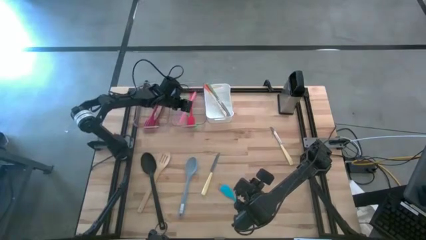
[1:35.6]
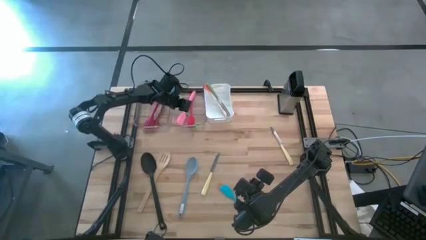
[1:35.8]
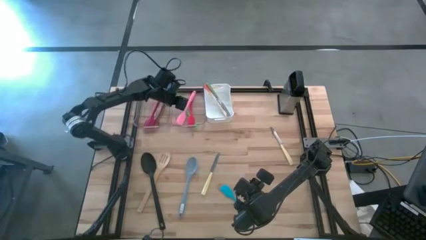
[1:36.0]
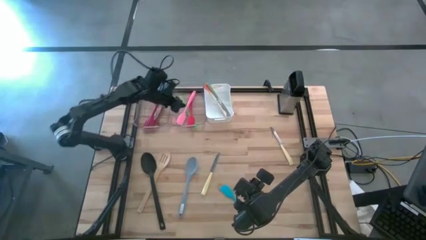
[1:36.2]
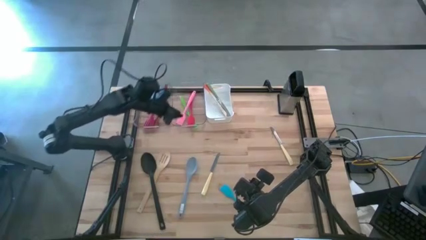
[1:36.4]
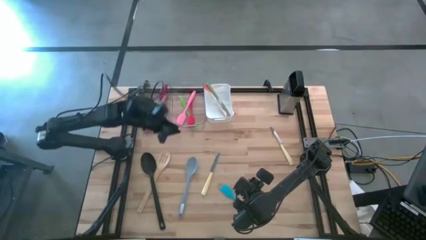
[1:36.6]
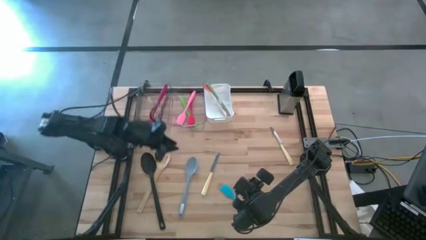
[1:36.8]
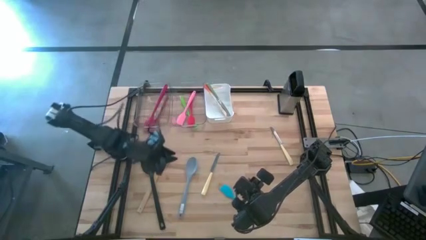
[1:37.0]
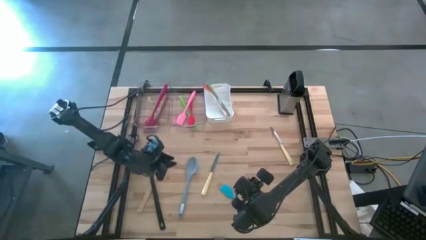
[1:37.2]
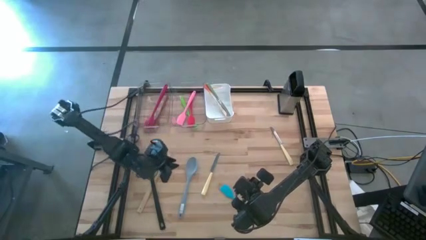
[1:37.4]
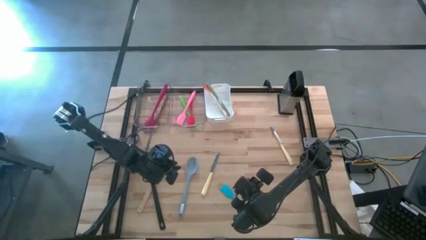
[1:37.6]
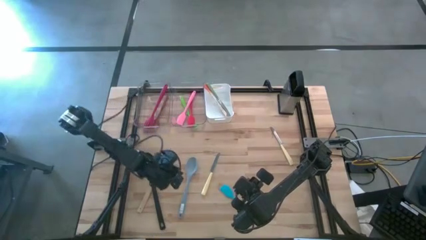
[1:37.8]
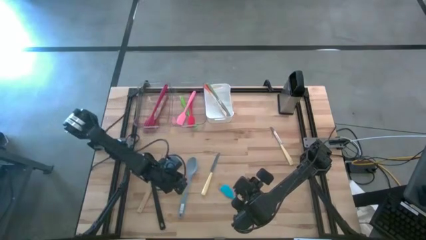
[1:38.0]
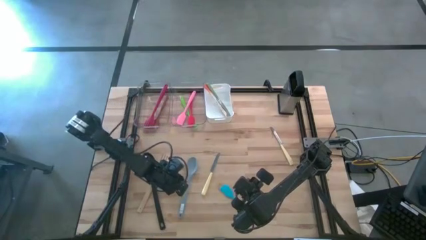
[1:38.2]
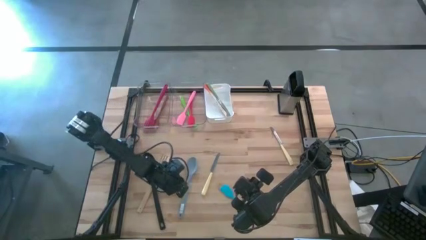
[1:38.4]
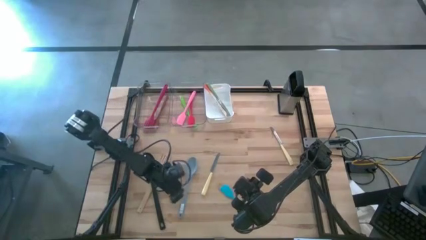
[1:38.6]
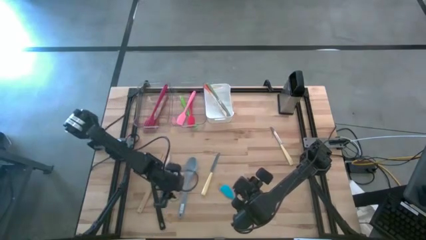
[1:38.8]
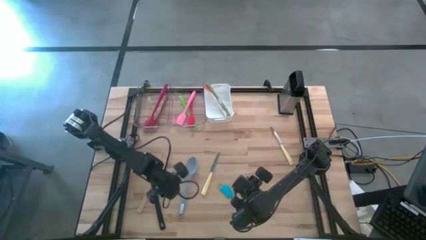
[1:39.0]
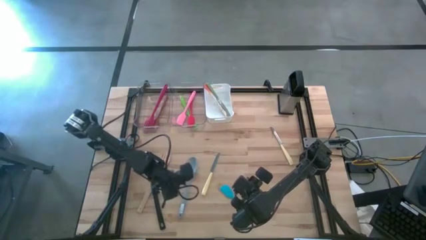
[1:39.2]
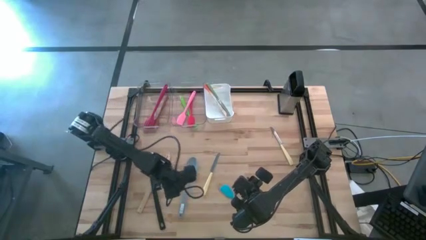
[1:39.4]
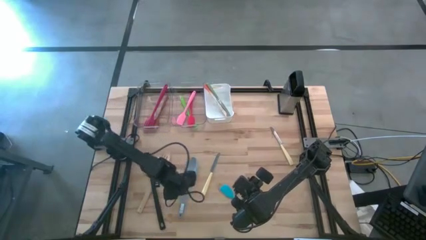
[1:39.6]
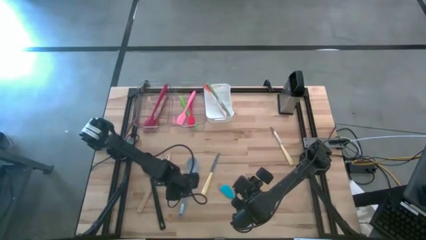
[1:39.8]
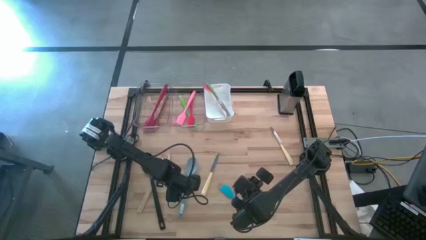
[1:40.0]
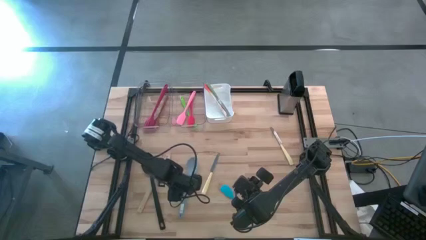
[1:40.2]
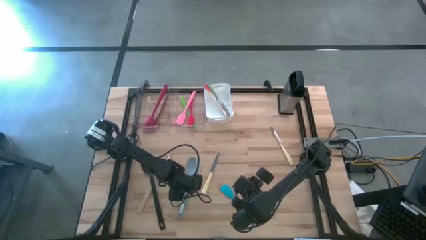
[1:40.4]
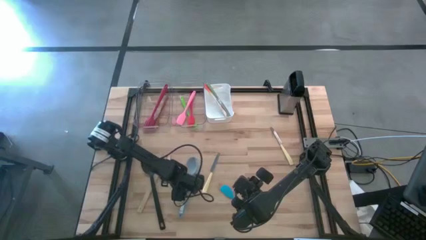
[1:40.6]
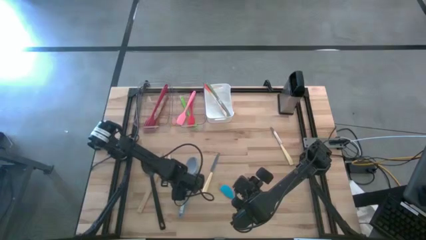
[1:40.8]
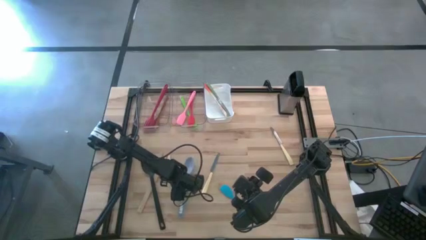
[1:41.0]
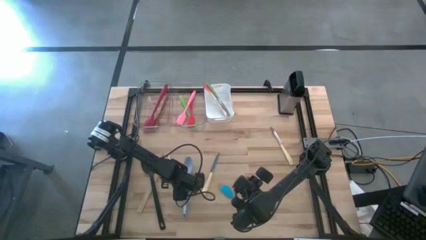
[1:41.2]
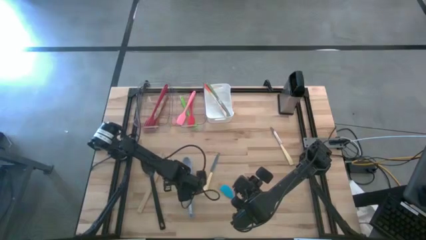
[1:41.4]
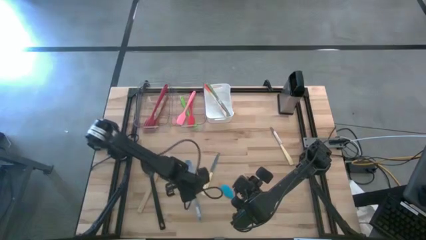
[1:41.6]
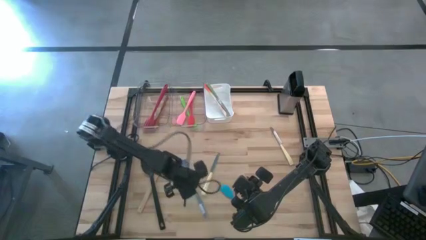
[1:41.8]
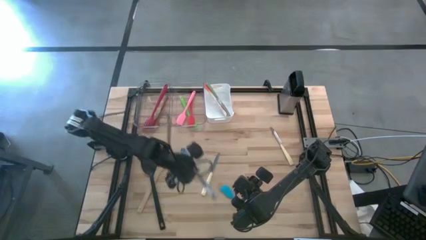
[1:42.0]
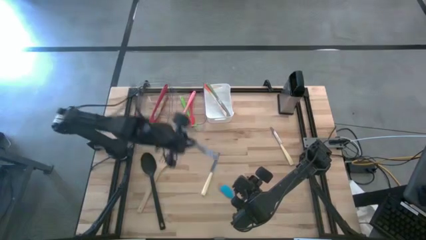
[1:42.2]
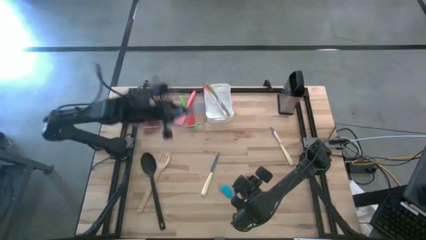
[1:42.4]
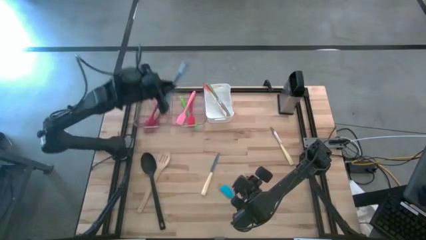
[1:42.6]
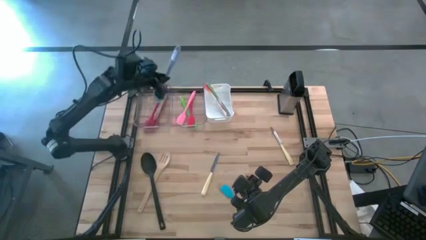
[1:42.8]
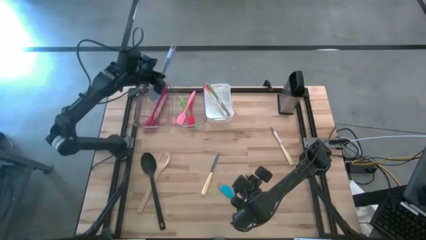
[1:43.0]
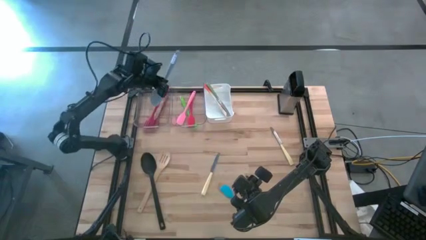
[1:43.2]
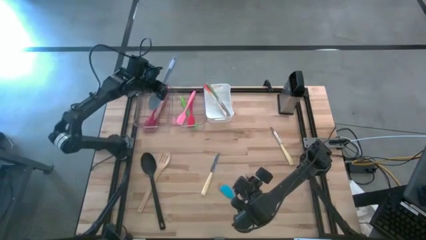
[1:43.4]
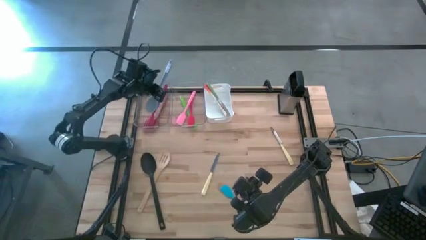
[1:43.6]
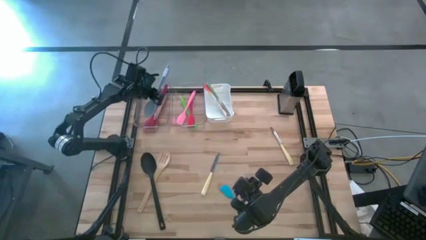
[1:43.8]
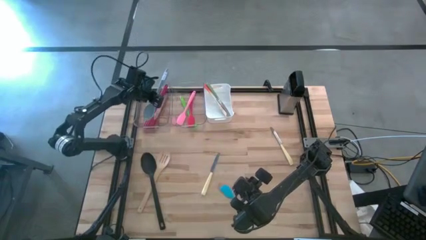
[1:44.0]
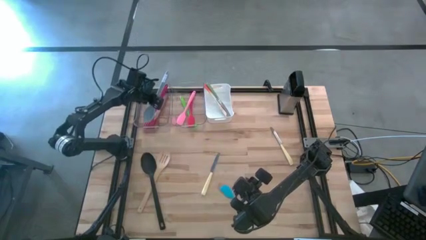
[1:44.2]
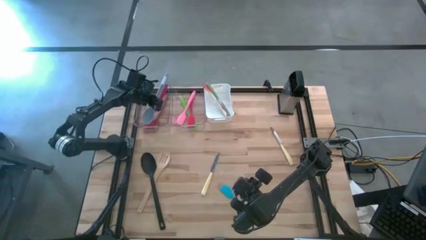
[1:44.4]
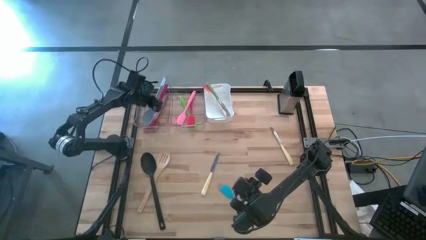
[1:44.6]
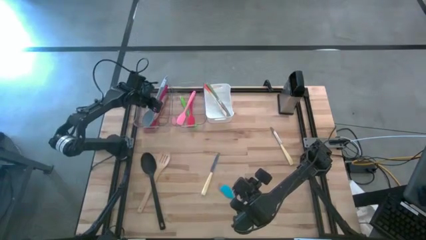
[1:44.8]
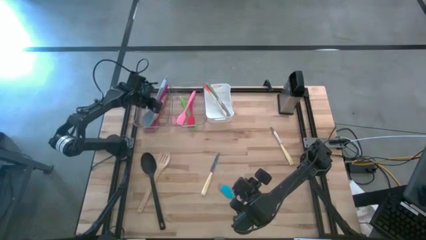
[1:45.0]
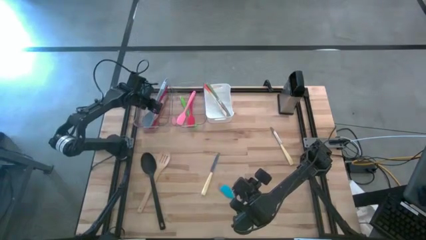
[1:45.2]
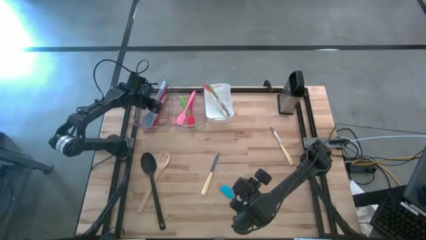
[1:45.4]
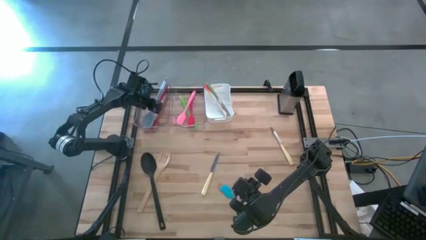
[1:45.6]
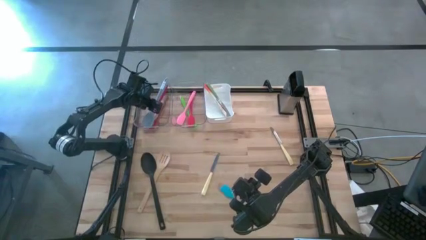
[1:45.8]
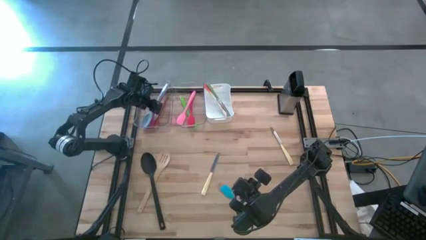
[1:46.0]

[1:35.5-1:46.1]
Task: Pick & Place Kitchen Items
Put the gray serving spoon into the left transparent bin

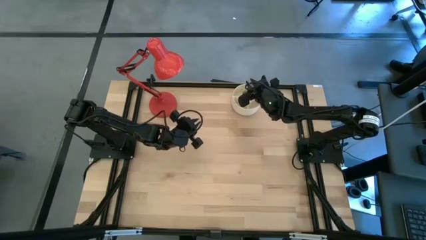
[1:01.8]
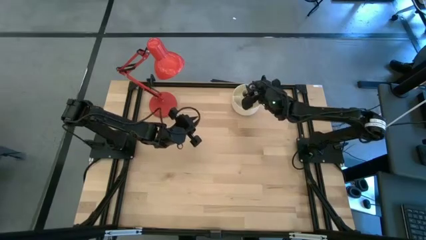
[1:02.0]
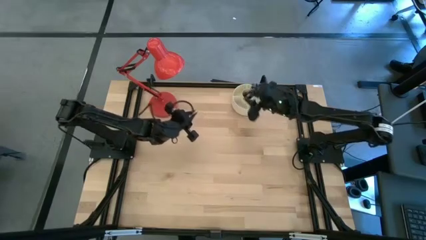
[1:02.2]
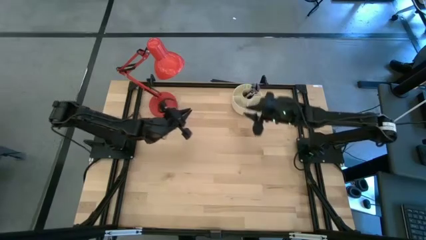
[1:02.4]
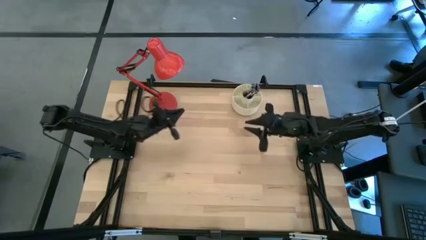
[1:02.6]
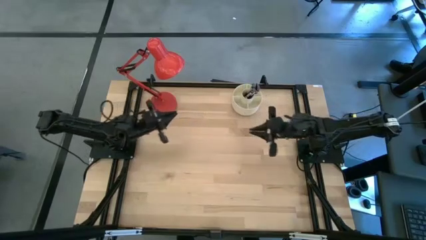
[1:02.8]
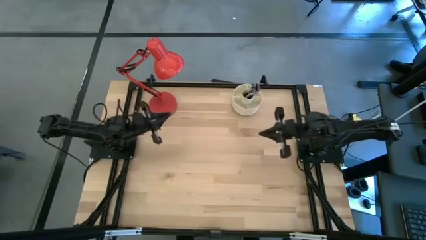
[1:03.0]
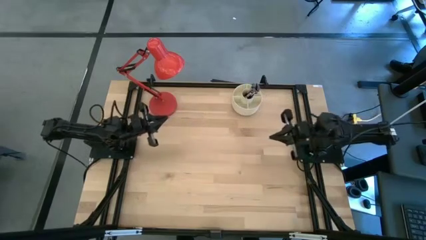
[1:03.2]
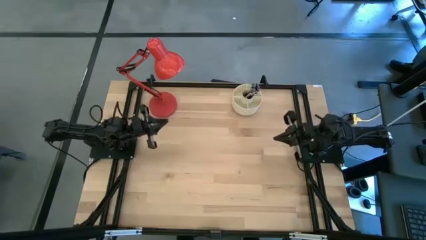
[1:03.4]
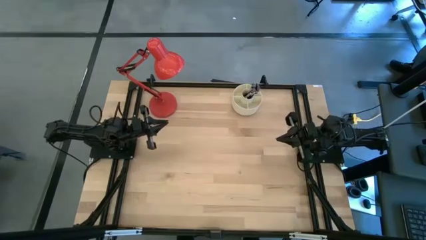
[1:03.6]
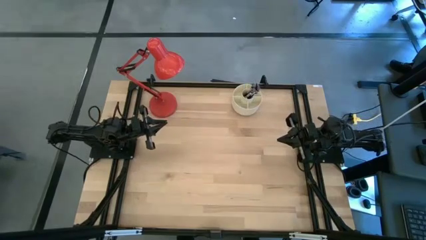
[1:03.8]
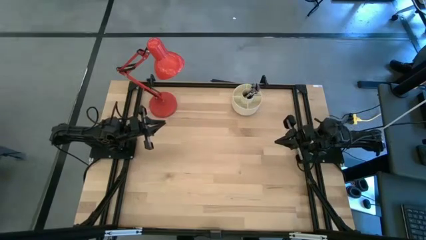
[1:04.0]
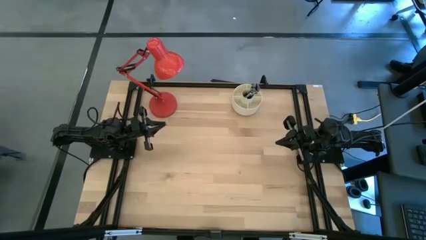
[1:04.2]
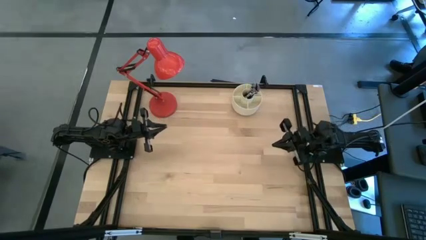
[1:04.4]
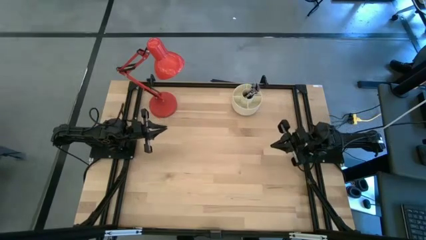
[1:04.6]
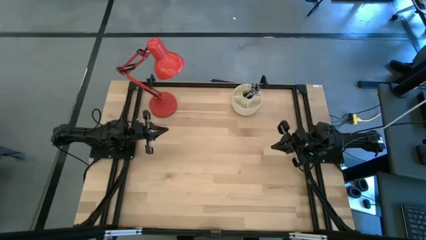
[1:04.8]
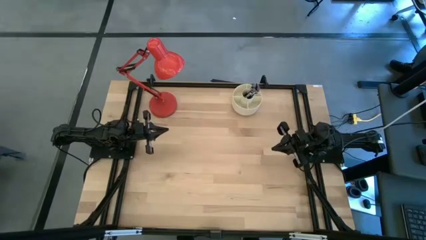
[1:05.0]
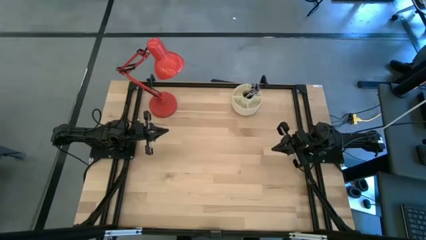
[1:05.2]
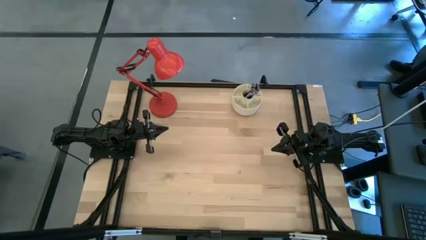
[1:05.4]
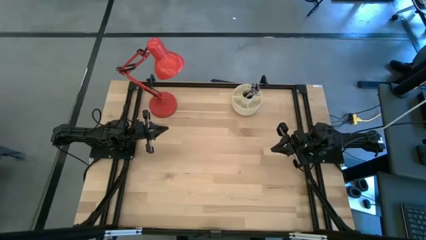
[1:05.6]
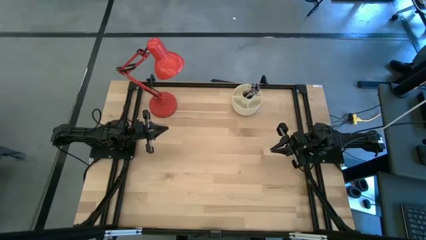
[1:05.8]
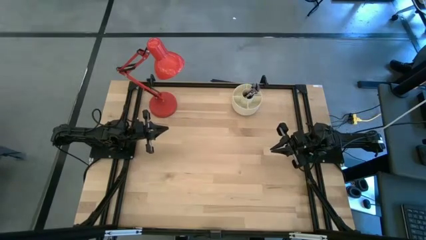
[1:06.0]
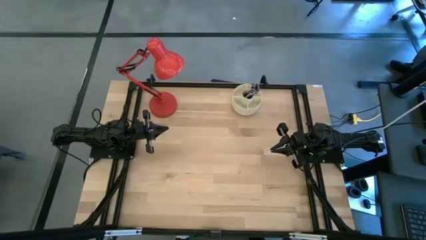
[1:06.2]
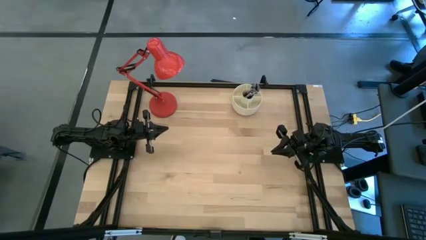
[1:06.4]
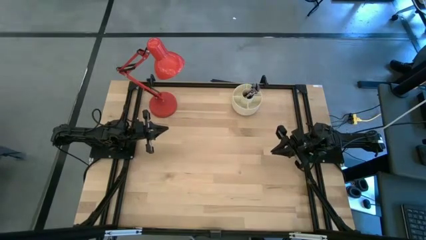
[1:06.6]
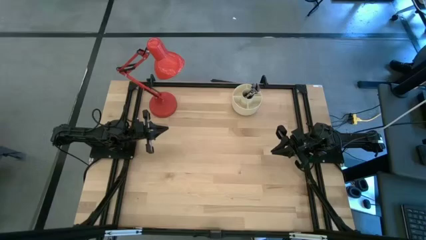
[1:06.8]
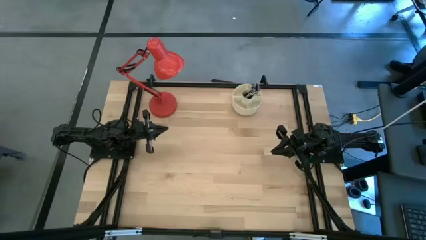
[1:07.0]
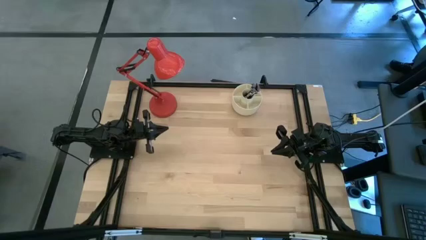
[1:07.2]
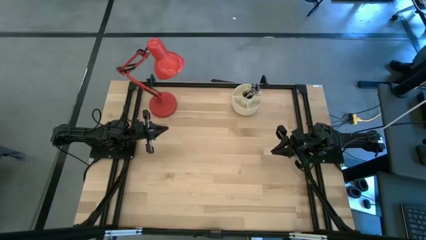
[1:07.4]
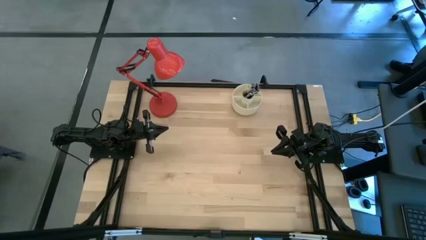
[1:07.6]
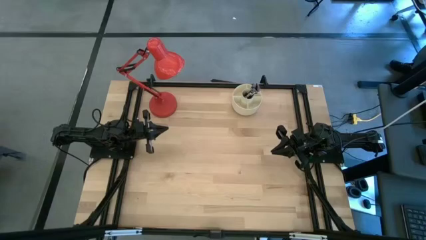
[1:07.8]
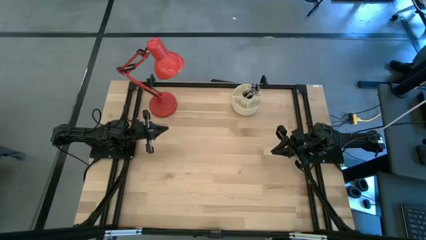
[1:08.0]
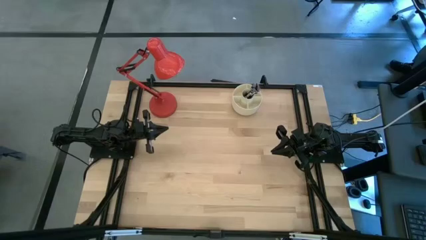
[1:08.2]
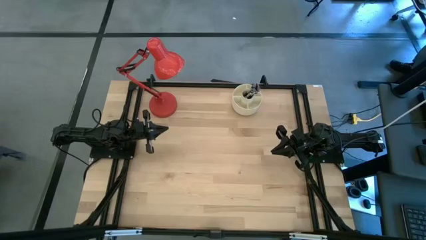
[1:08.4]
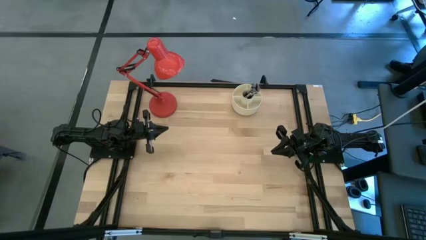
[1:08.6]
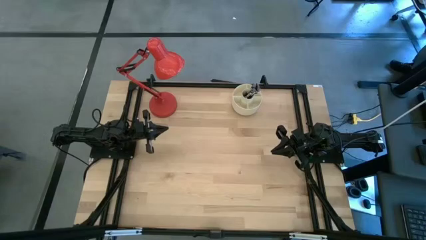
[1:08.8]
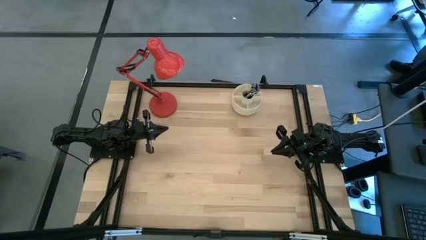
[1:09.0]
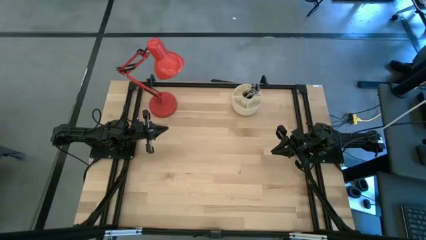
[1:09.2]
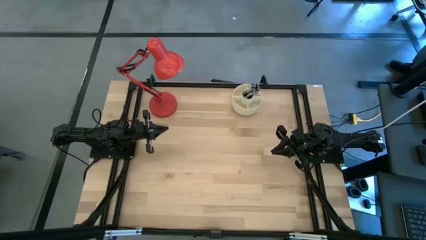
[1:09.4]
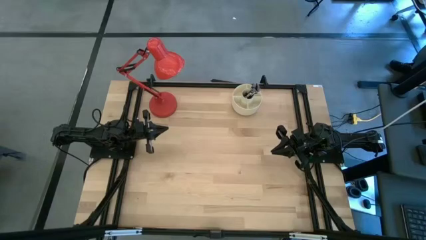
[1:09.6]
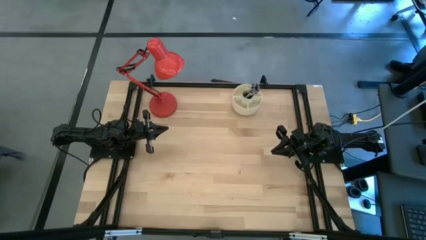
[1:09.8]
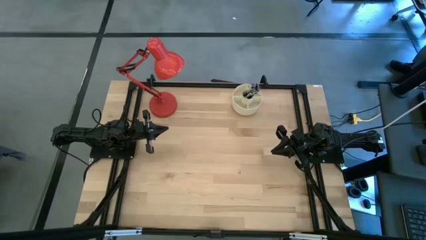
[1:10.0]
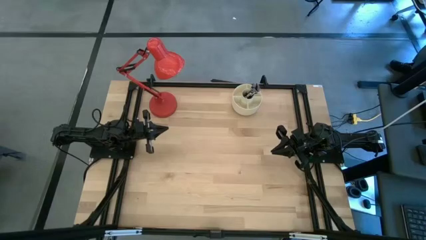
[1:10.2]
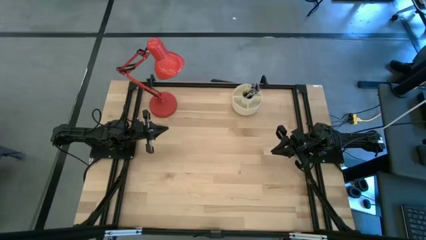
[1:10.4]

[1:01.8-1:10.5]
Task: Put items in baskets/containers
Return to Home Position
